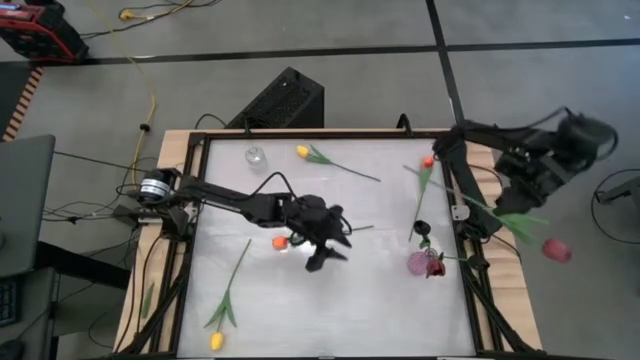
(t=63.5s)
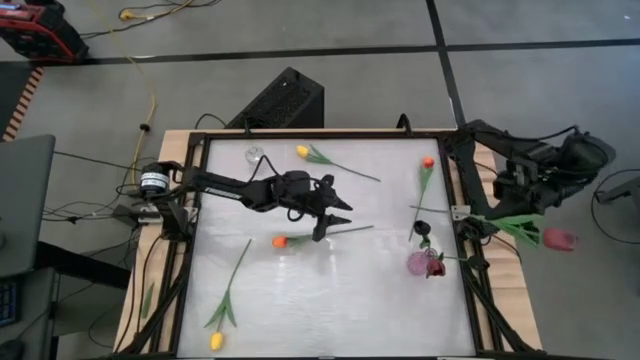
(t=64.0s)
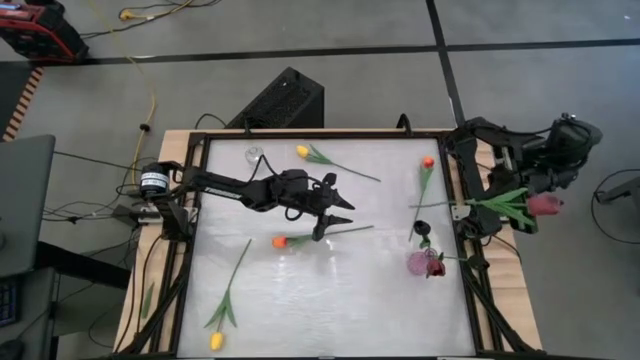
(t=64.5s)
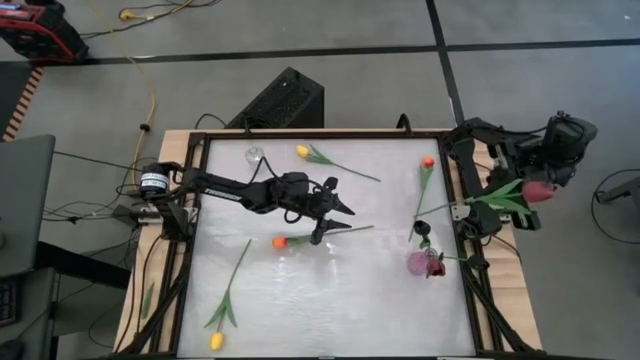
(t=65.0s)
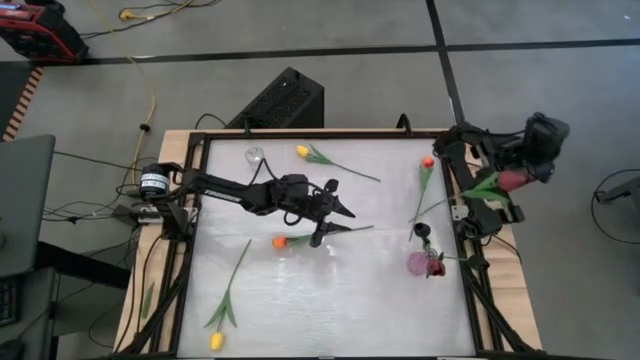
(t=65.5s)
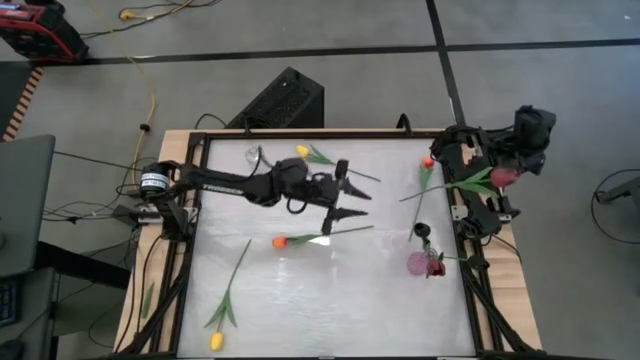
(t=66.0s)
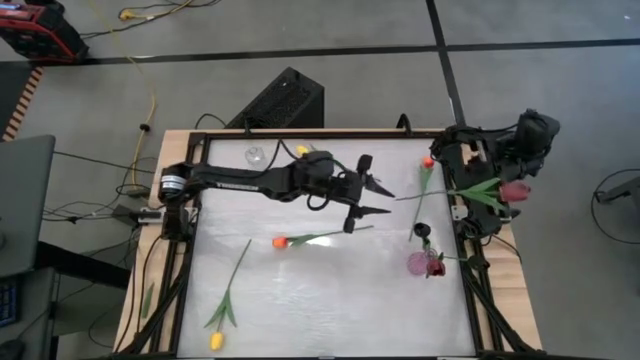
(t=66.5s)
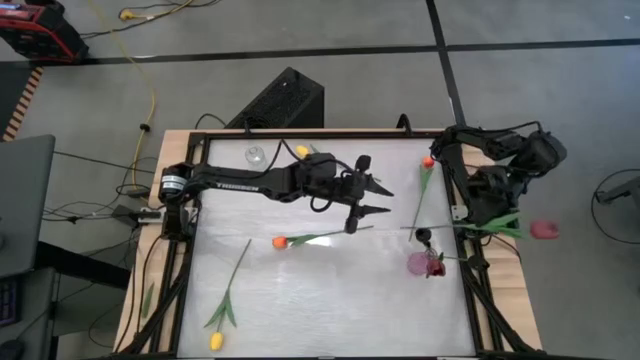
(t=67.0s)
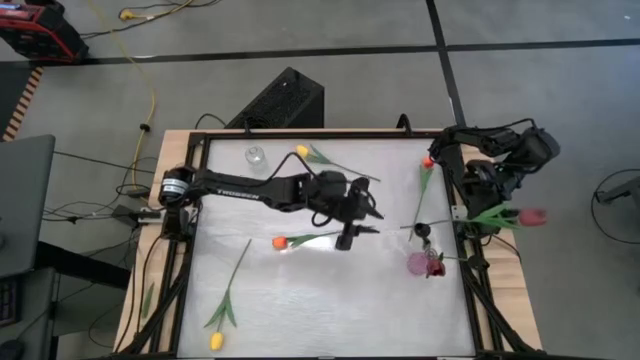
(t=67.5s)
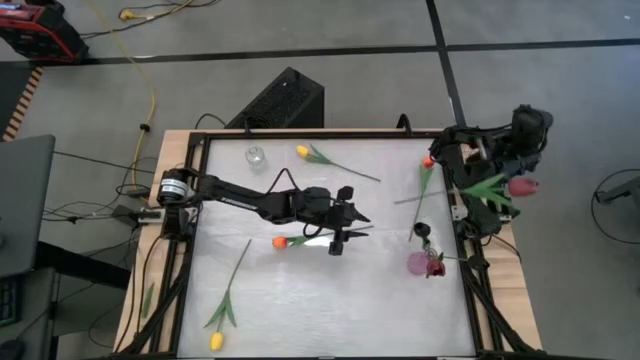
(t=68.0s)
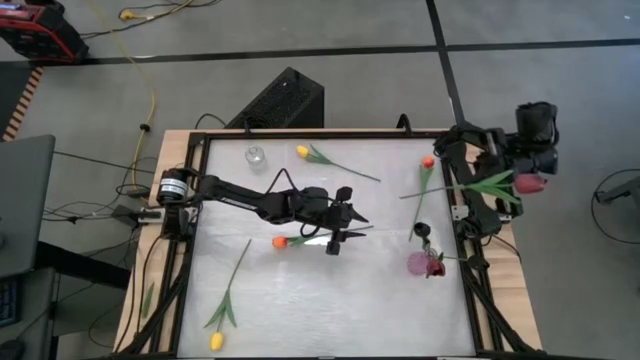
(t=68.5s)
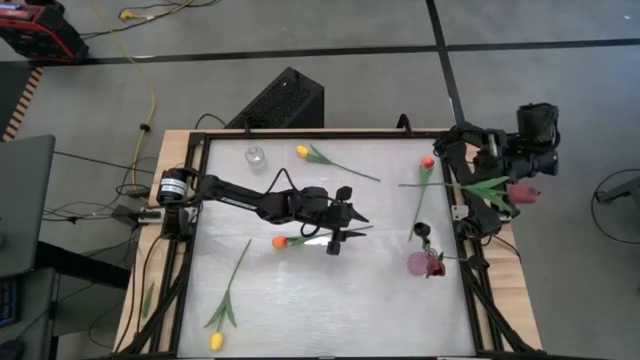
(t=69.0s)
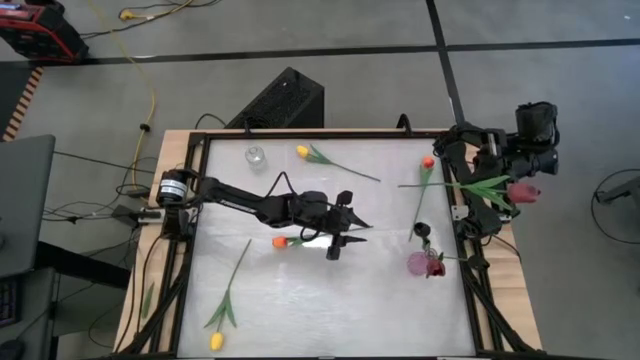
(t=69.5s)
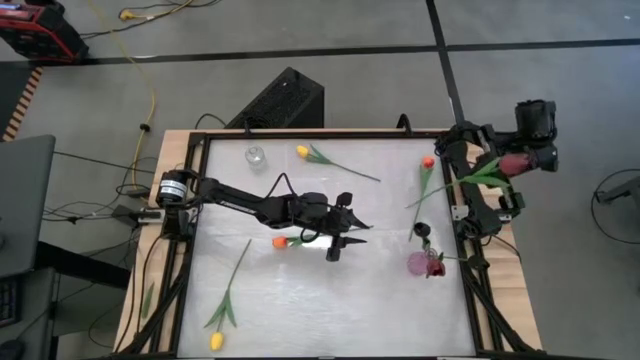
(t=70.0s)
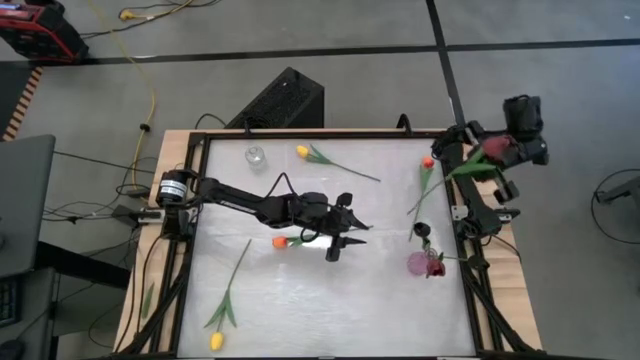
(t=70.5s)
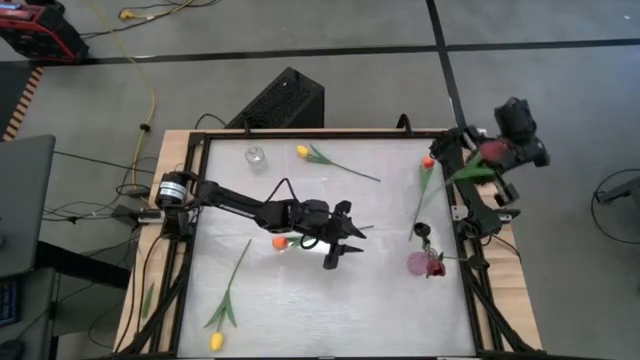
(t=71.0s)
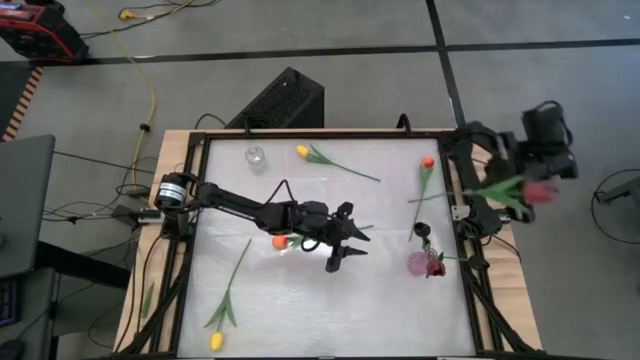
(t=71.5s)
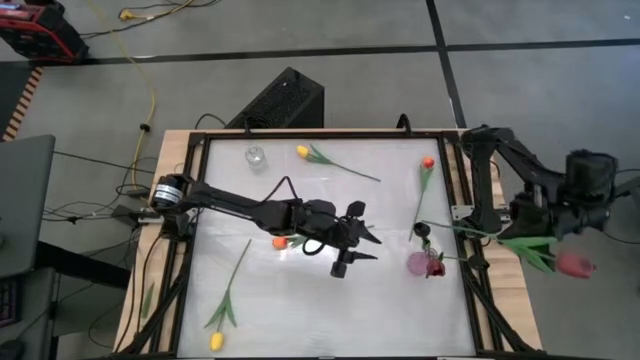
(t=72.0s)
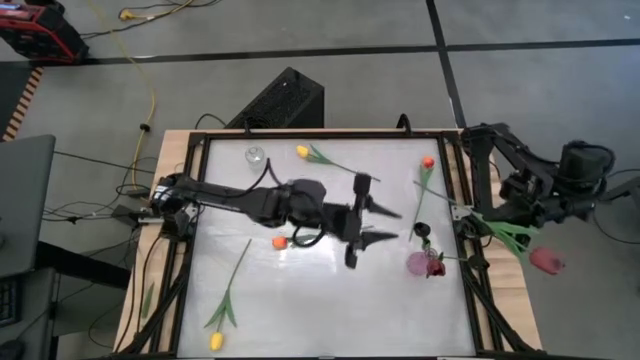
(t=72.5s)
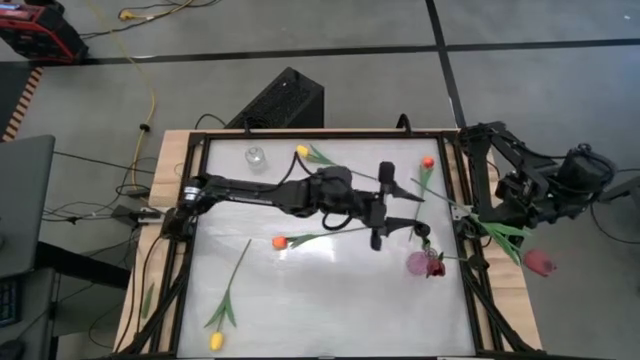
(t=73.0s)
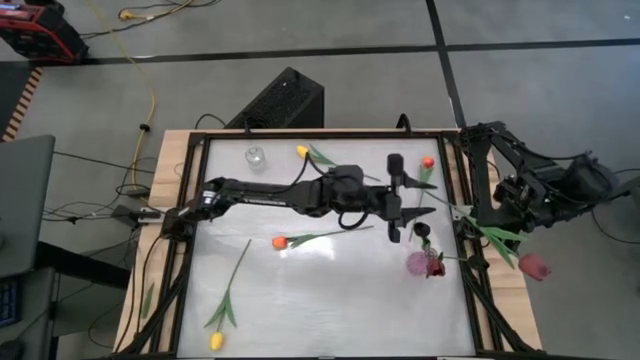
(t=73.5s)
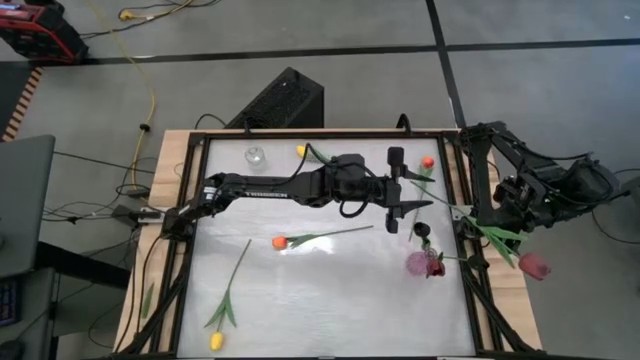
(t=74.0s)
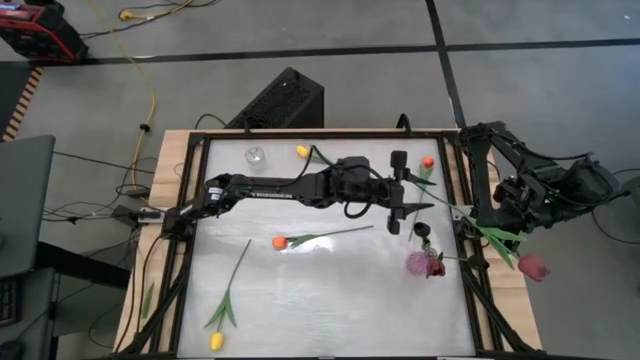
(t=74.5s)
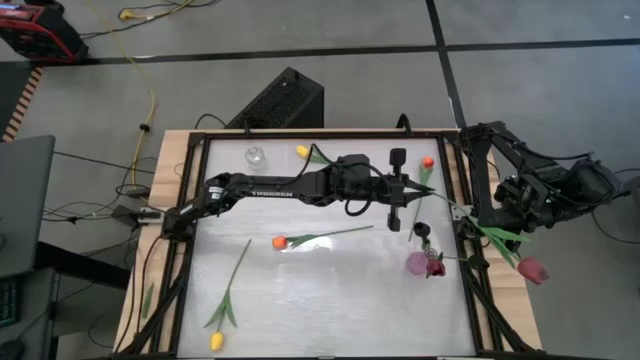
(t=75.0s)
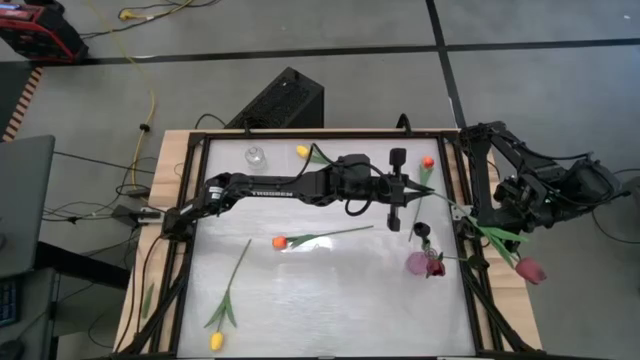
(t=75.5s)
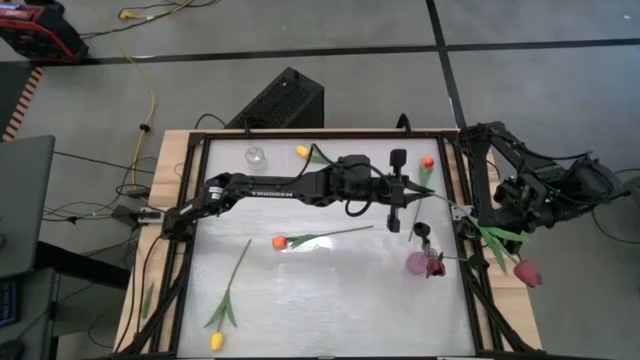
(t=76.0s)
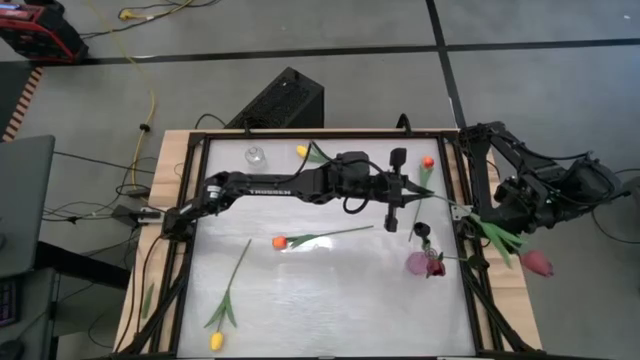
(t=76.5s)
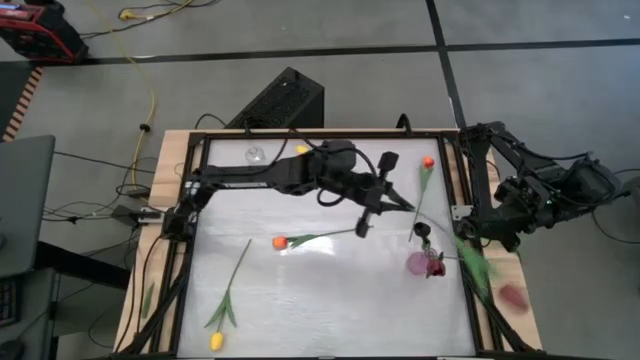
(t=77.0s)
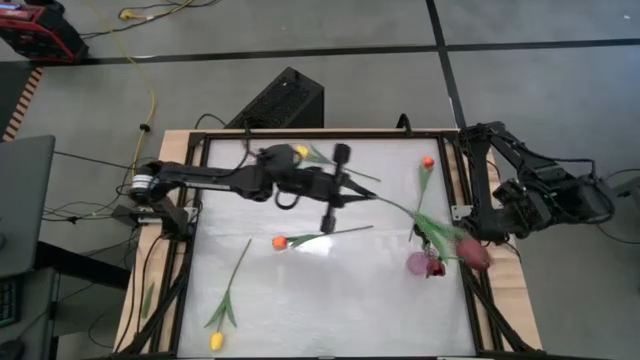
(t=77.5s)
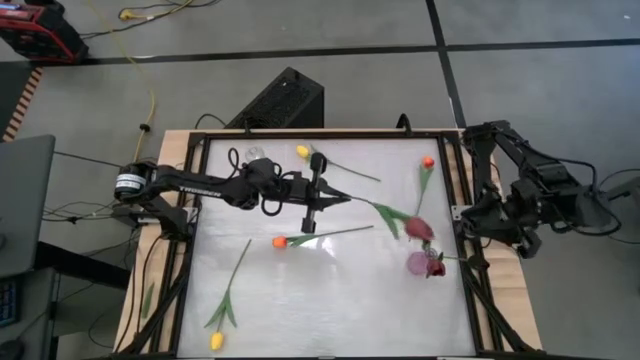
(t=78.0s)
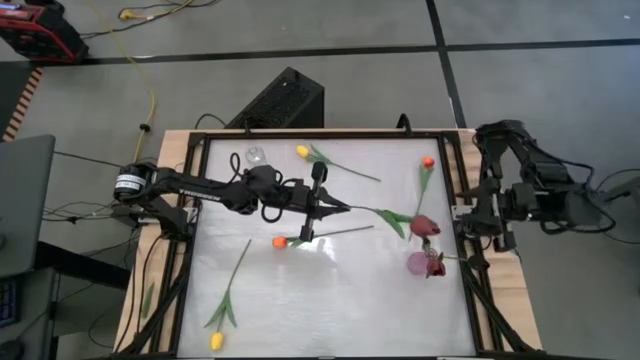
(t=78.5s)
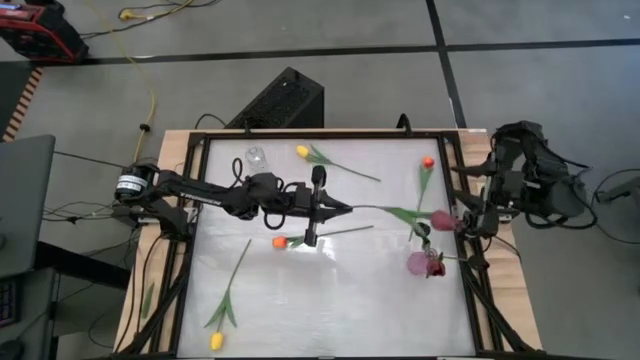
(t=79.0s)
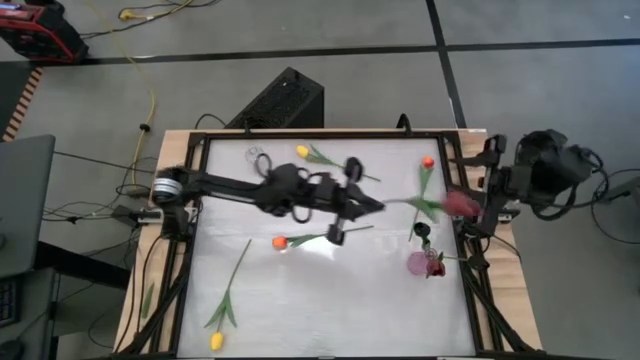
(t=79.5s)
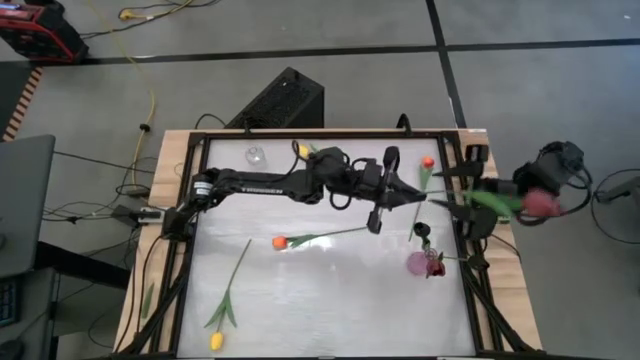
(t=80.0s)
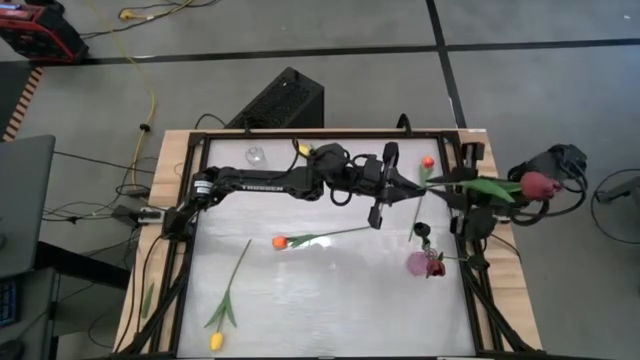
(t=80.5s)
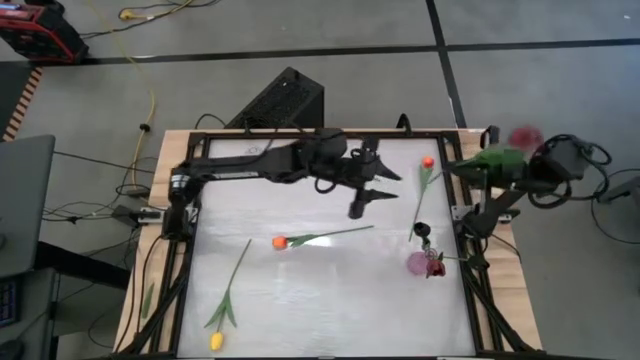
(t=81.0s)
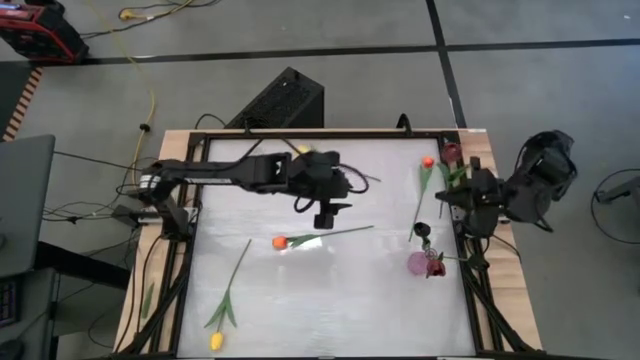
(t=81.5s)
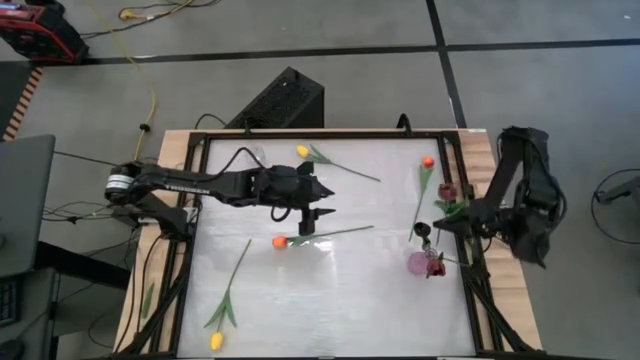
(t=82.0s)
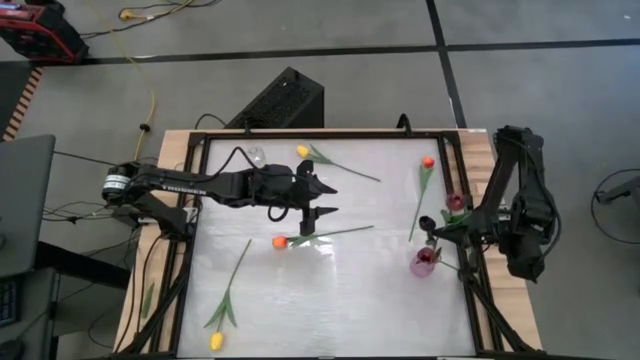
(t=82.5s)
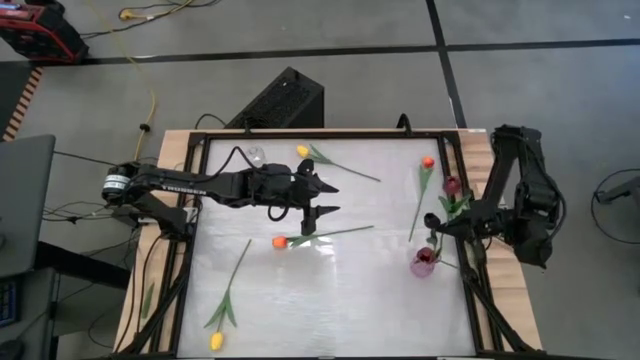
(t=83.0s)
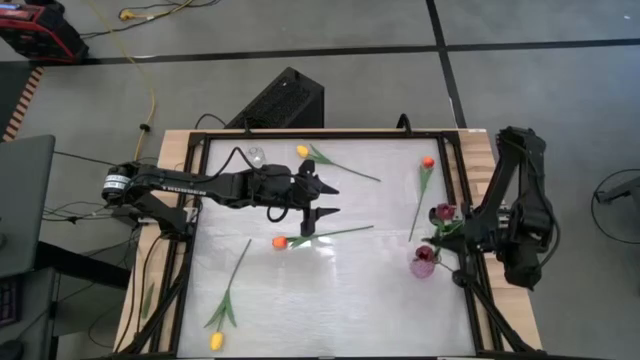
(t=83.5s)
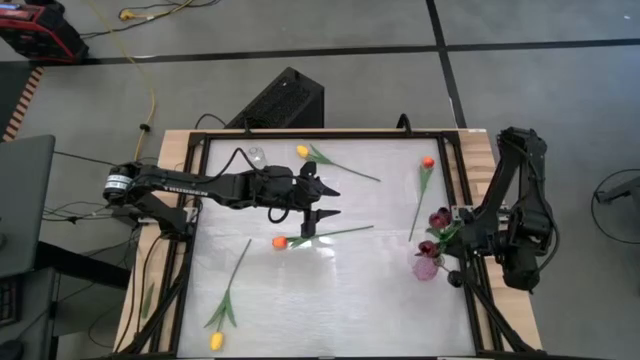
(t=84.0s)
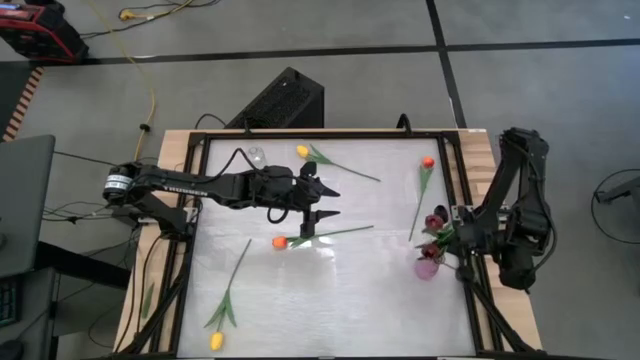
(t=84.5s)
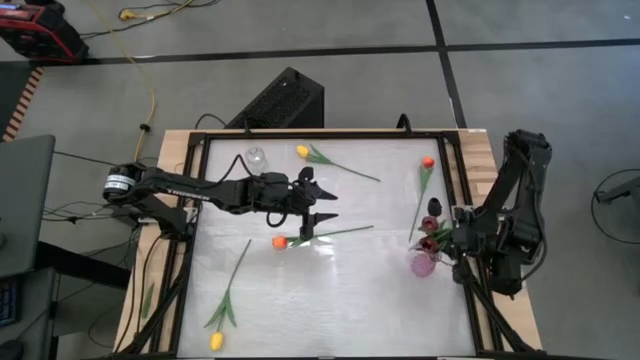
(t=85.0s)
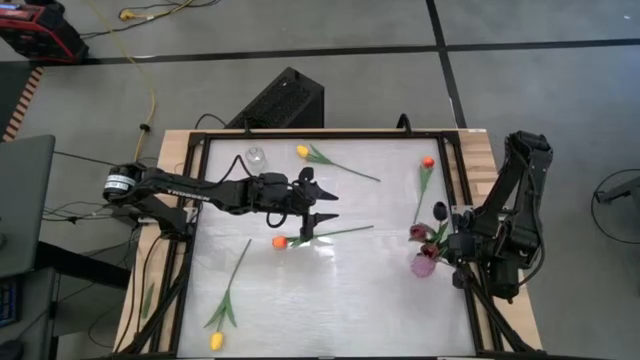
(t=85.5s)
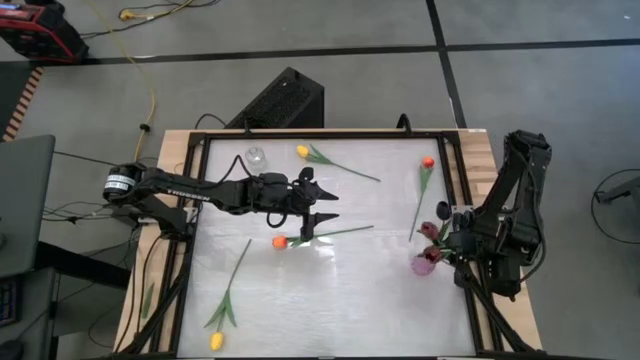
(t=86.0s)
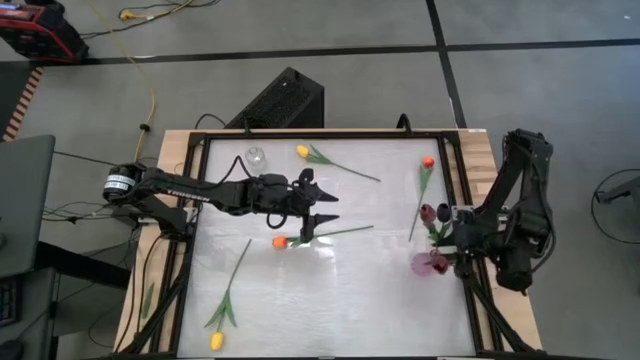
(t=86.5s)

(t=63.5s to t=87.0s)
Task: Sort flowers into vase by color
Put the dark red flower into the pink vase
